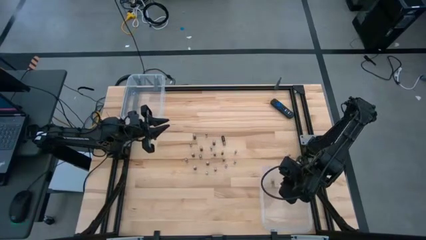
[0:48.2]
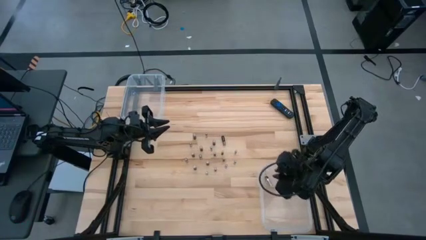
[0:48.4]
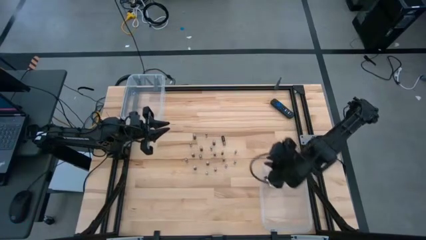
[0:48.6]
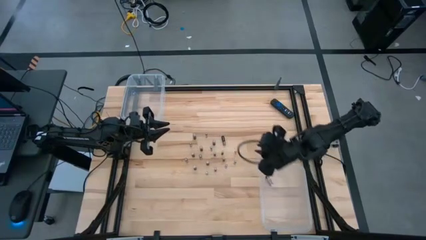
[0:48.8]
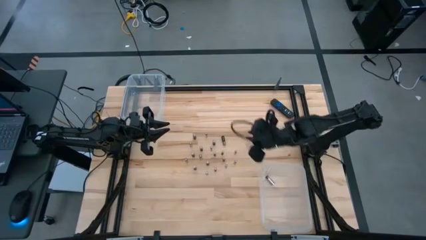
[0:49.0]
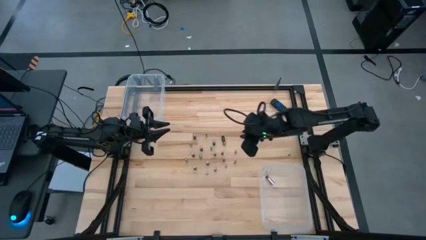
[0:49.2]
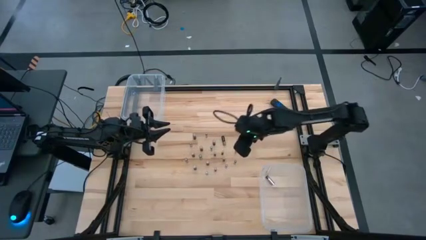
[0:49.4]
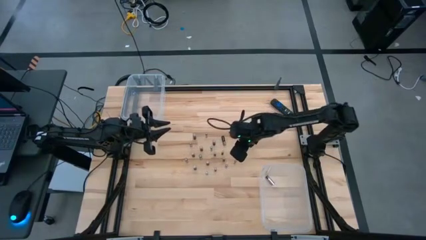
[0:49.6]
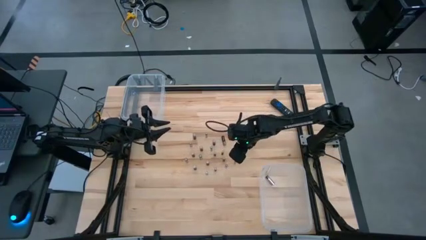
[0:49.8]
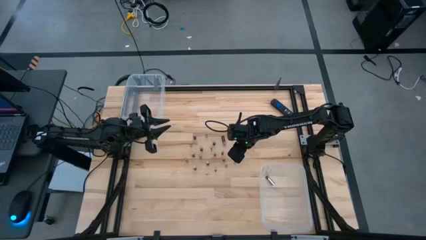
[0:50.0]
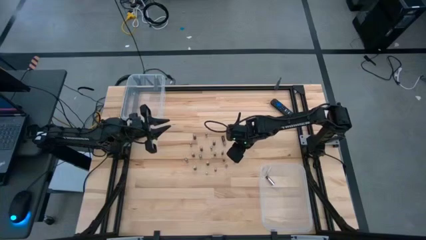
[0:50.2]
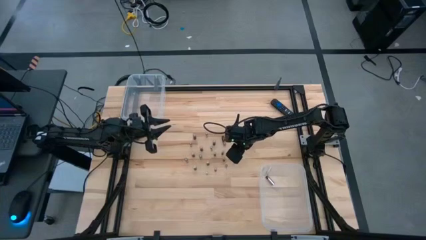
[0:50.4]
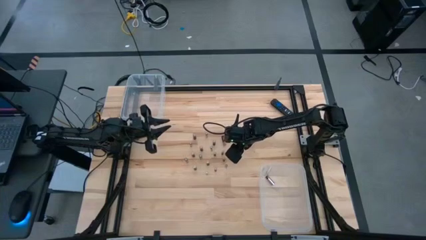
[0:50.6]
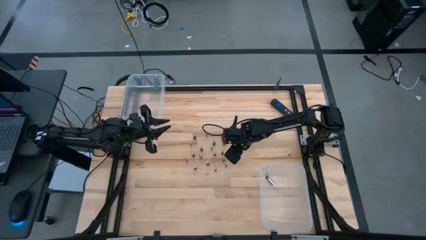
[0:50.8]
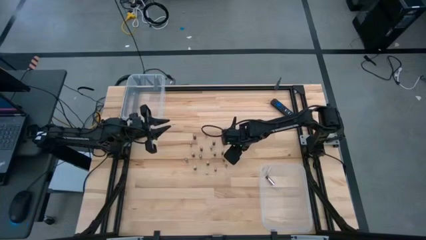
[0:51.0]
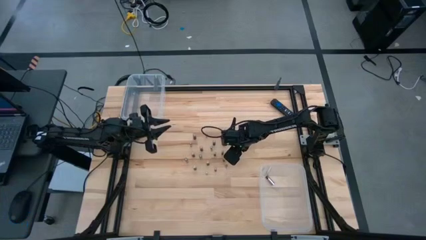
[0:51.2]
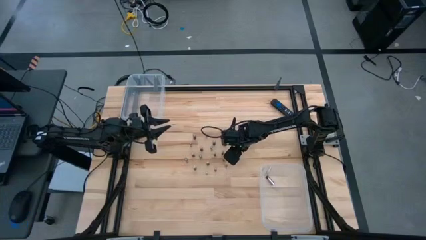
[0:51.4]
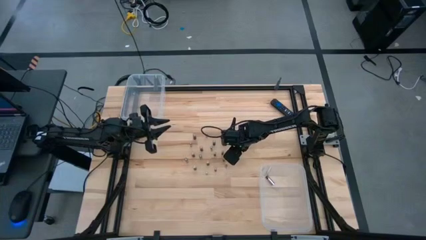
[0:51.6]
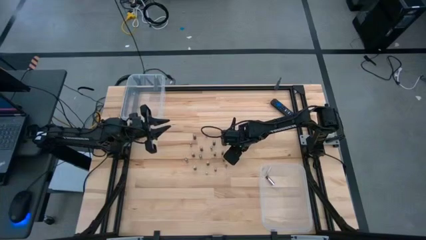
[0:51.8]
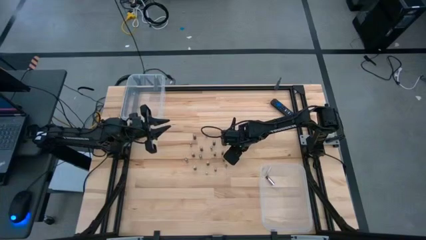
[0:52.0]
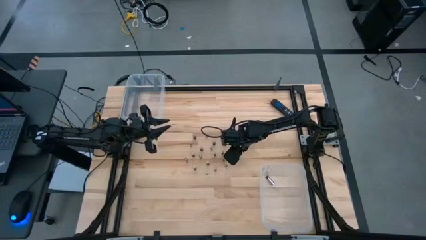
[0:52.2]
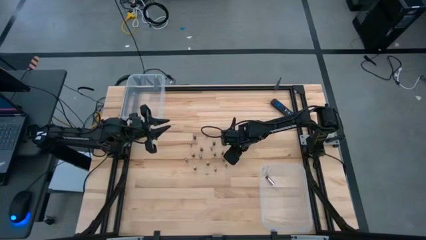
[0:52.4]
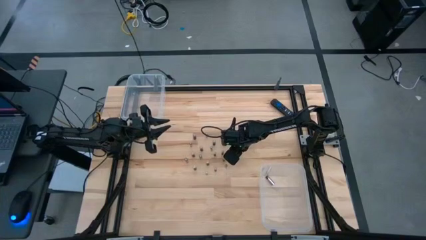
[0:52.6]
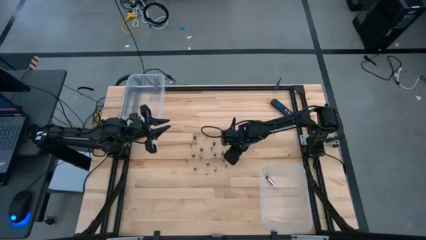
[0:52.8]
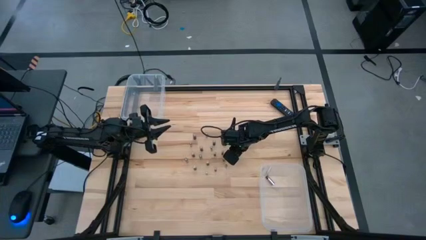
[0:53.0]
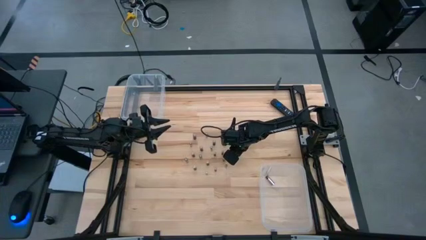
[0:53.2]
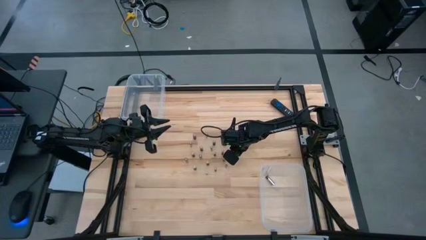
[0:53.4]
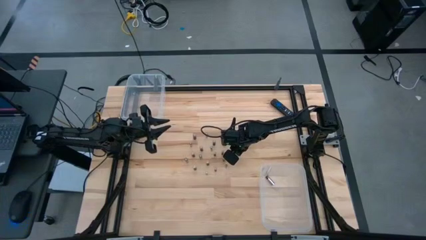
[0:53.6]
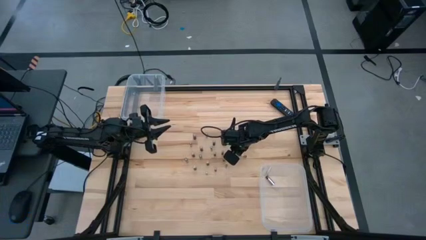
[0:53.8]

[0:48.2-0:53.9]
Task: Sort batteries
Put the black and silver battery into the bottom transparent bin

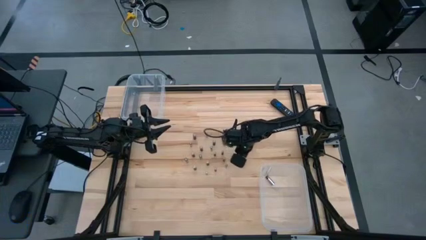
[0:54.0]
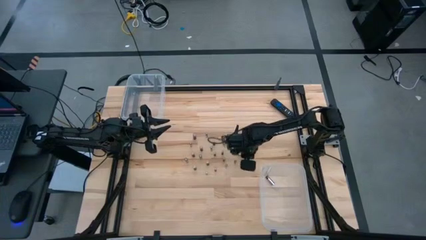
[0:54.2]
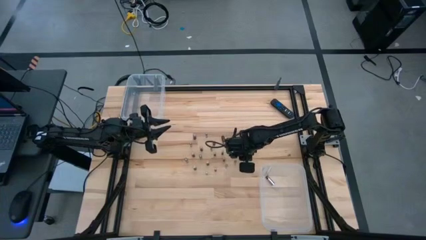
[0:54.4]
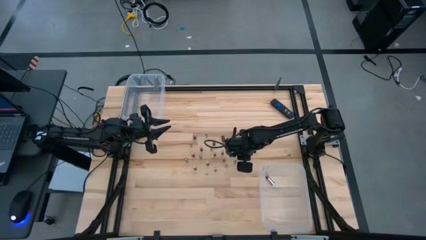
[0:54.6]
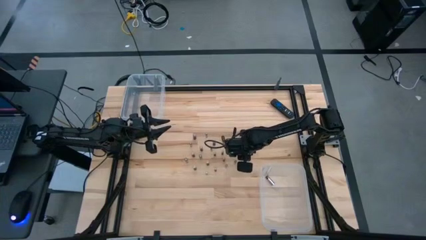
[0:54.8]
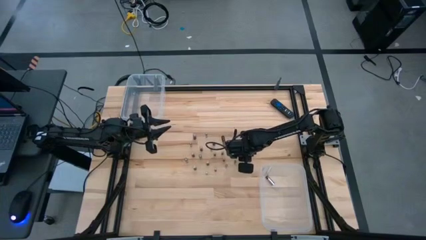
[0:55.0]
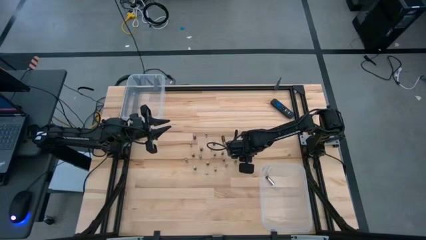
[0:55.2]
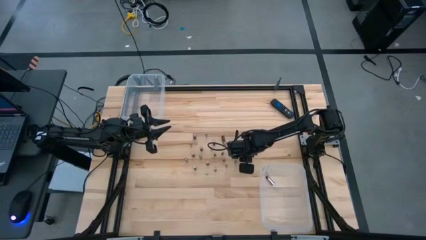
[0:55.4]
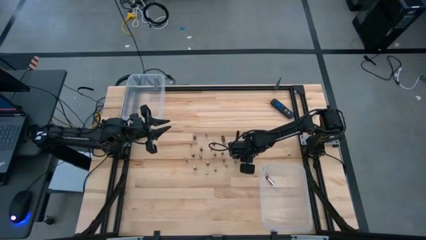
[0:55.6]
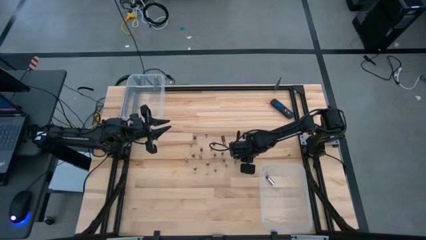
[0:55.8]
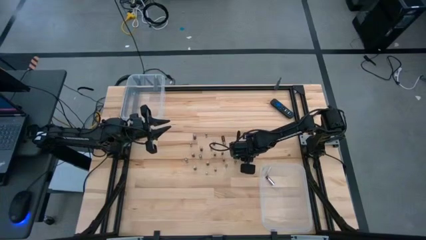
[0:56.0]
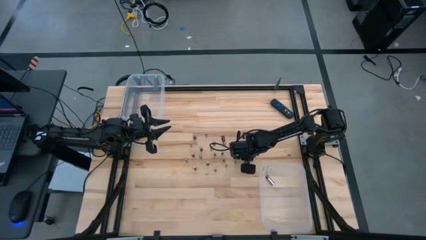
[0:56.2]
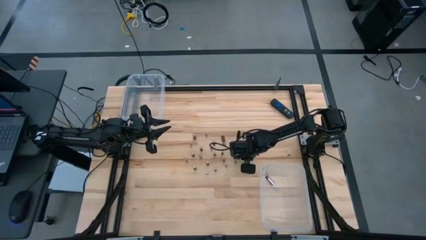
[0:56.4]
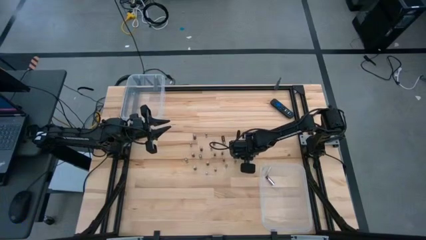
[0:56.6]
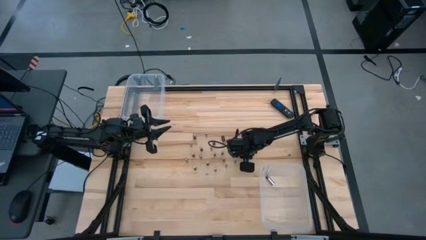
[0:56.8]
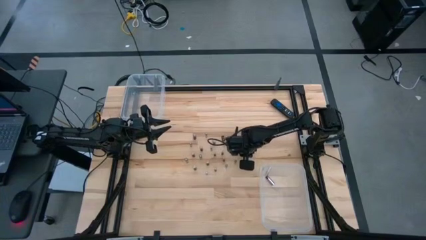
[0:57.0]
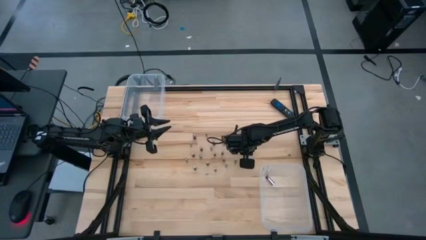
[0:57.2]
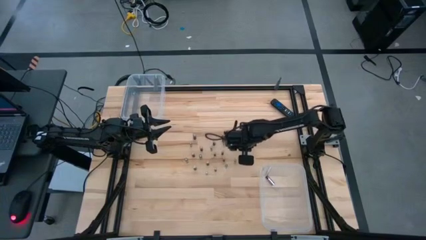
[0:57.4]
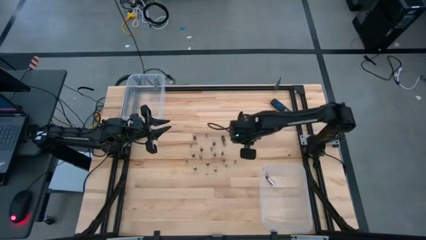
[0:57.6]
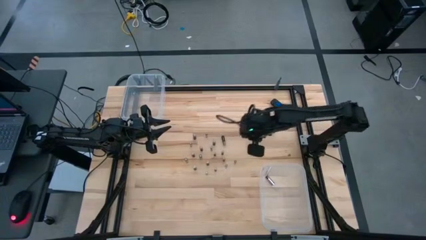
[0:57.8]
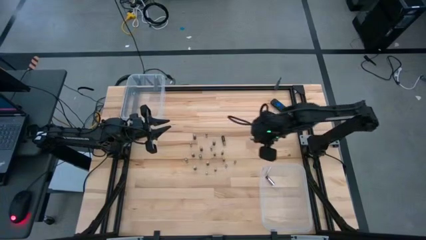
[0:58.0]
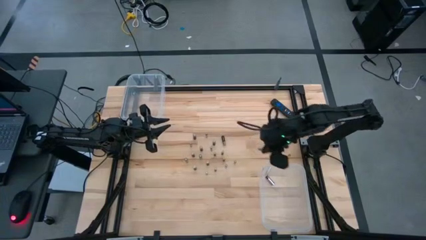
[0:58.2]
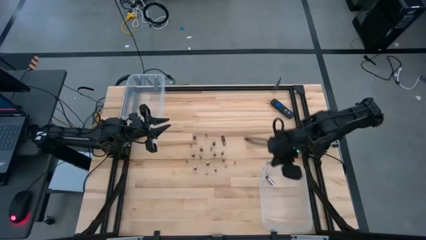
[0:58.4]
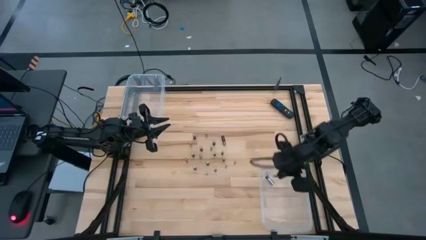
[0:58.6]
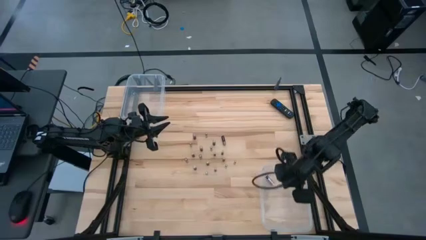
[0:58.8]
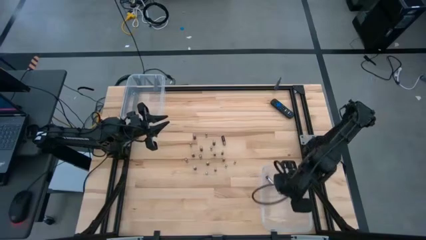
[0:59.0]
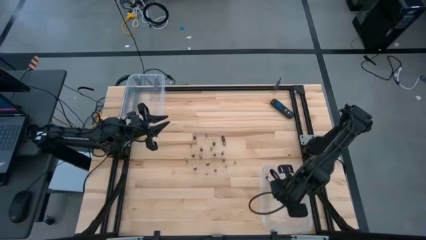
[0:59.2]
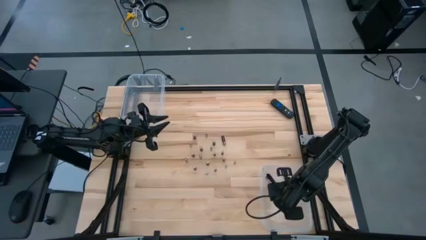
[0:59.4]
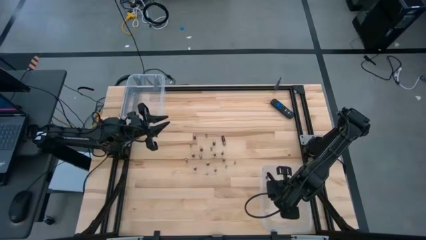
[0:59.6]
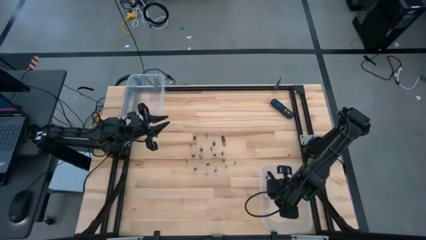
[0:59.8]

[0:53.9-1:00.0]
Put the black and silver battery into the bottom transparent bin
